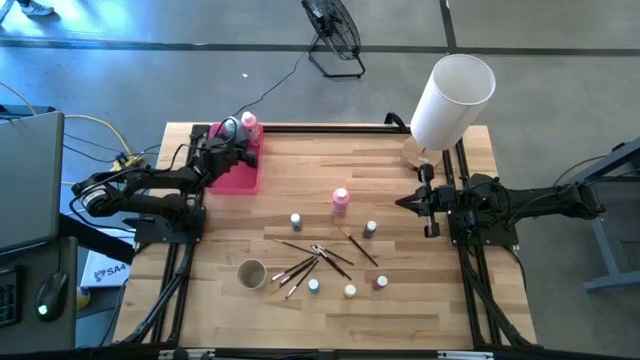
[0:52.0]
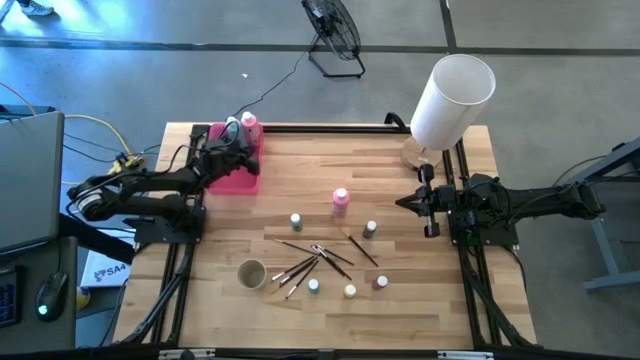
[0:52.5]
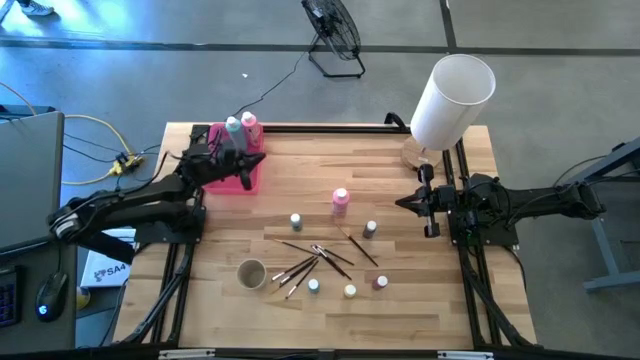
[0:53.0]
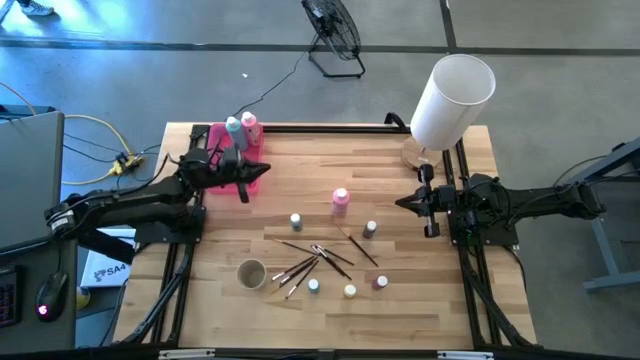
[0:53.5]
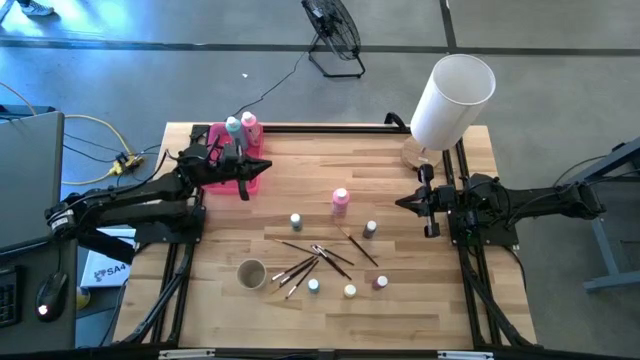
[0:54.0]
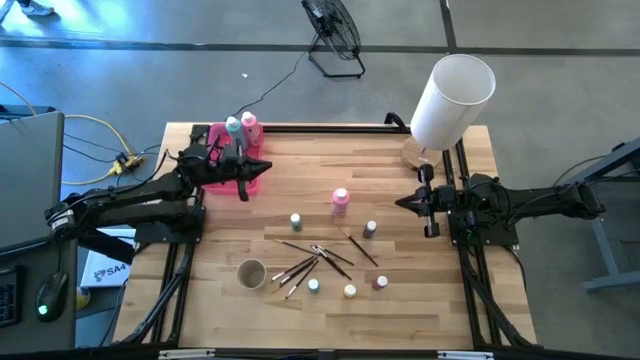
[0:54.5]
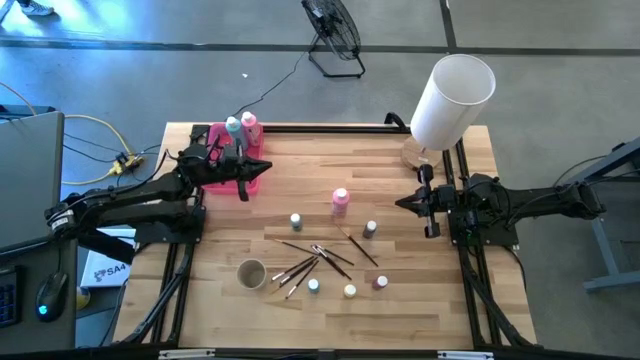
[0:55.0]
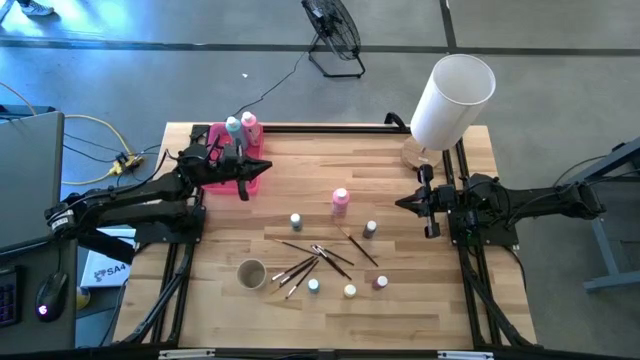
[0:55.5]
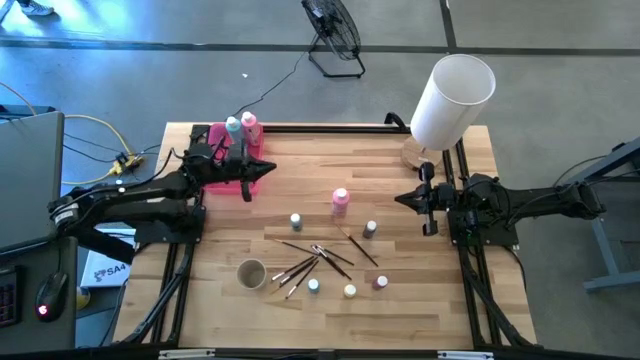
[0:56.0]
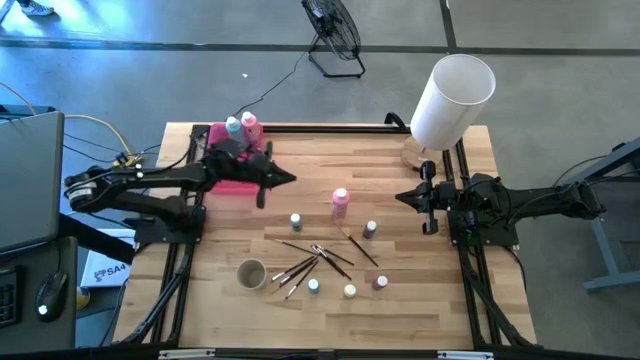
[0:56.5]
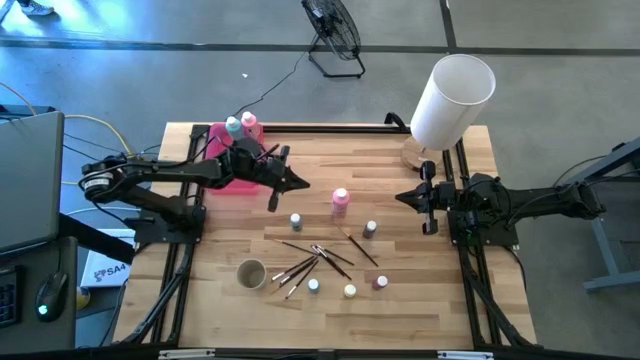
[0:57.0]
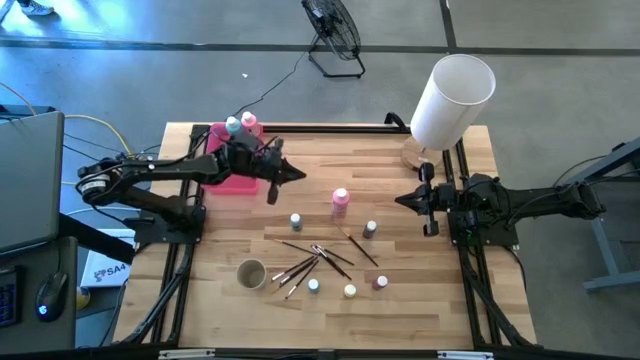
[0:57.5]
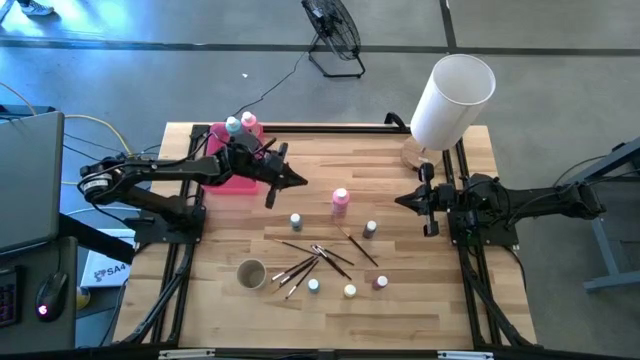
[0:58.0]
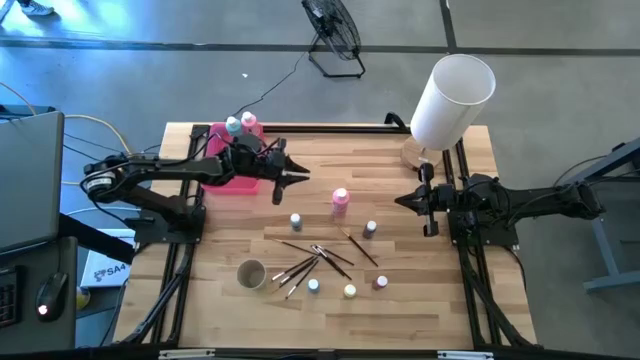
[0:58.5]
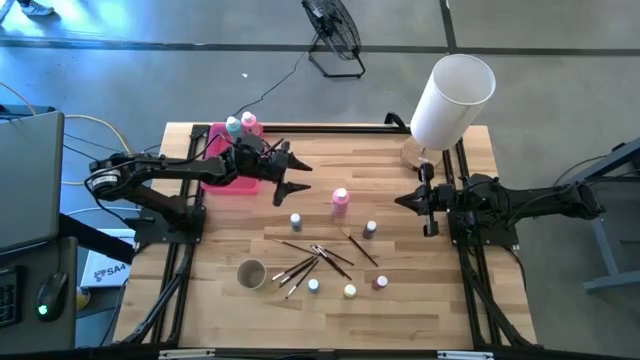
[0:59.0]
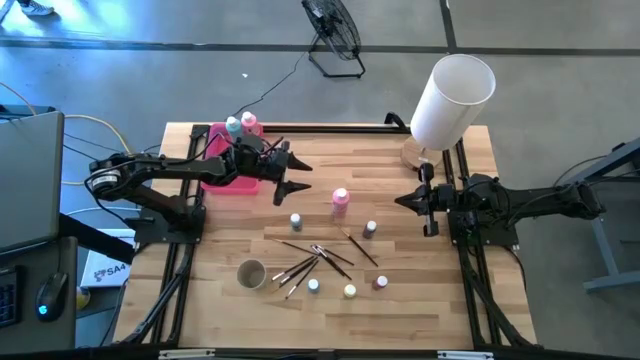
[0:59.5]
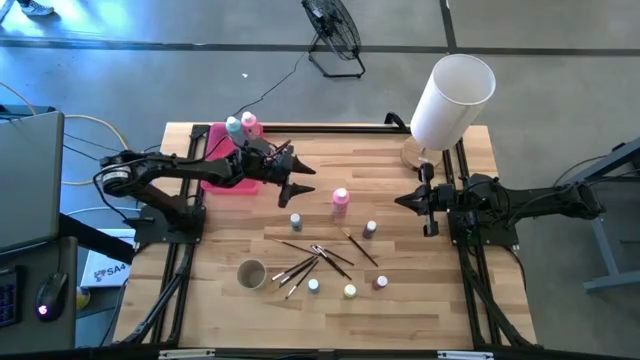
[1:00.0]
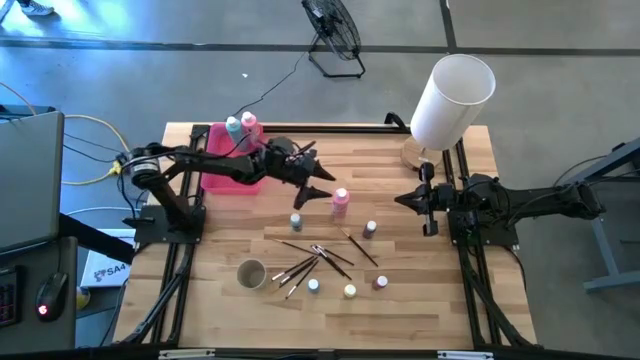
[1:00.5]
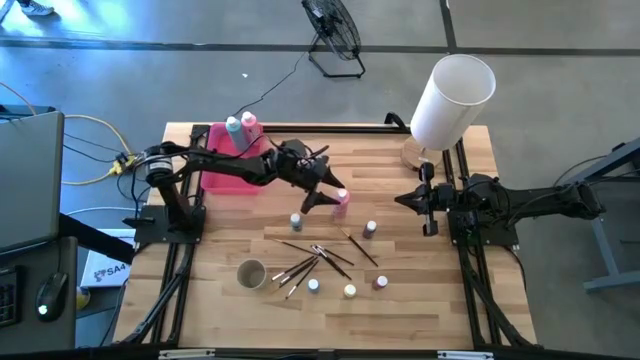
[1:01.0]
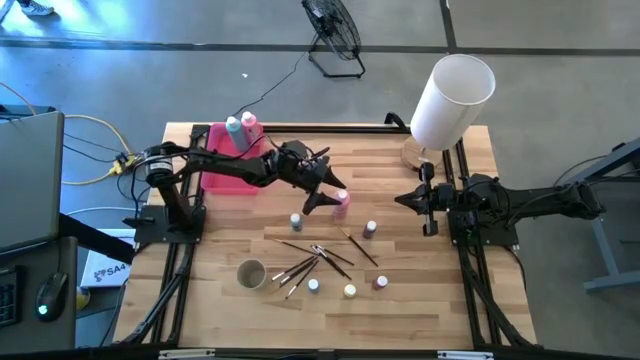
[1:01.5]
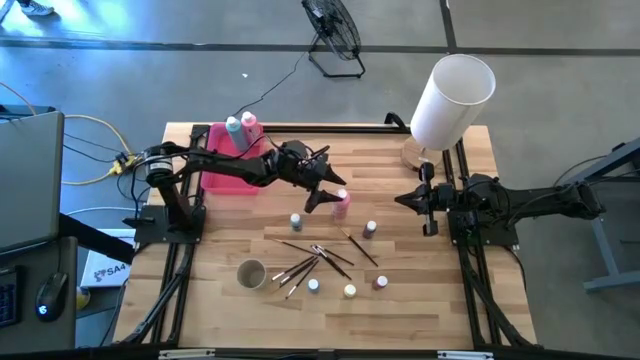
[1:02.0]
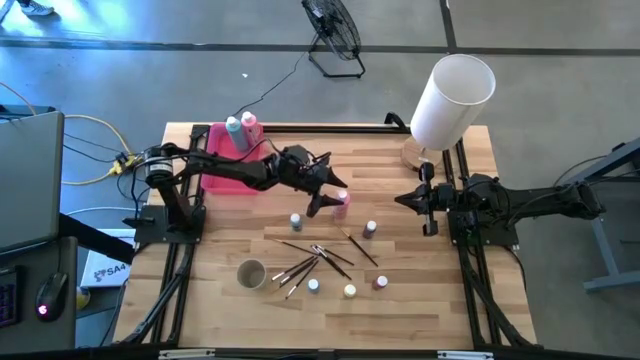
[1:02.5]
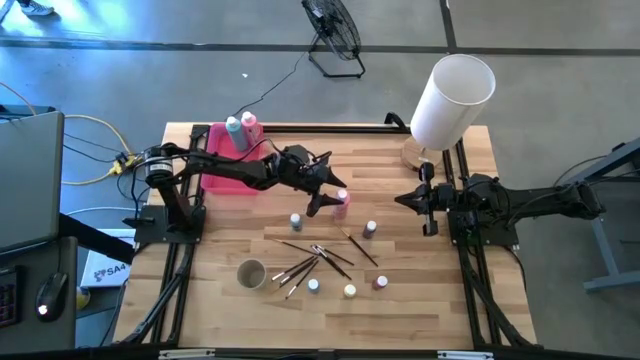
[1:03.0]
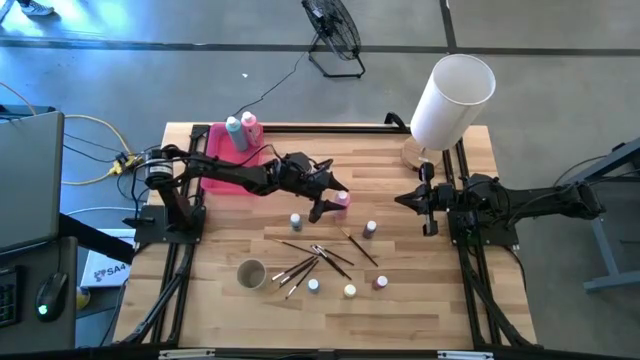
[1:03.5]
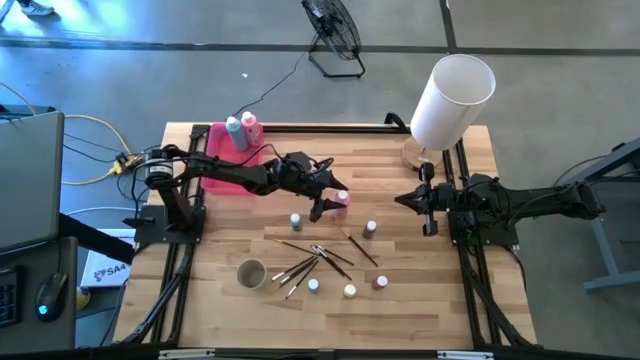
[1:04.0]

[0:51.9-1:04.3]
Task: Pick & Place Paint Supplies
Put the big pink paint bottle into the pink bin
